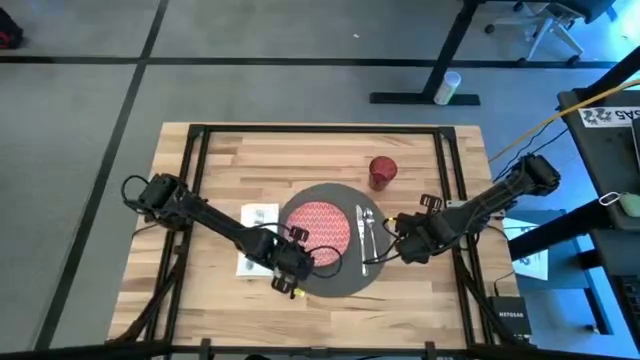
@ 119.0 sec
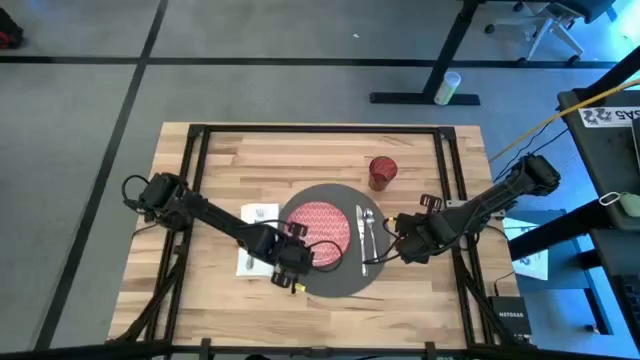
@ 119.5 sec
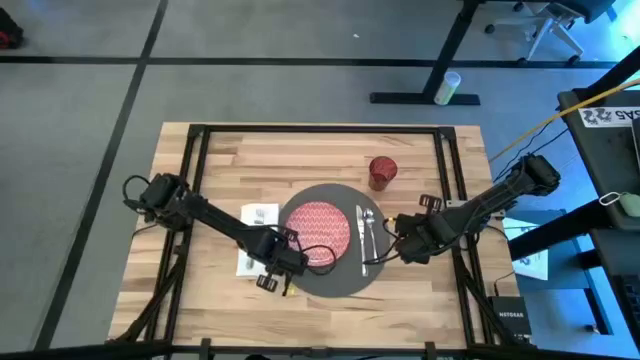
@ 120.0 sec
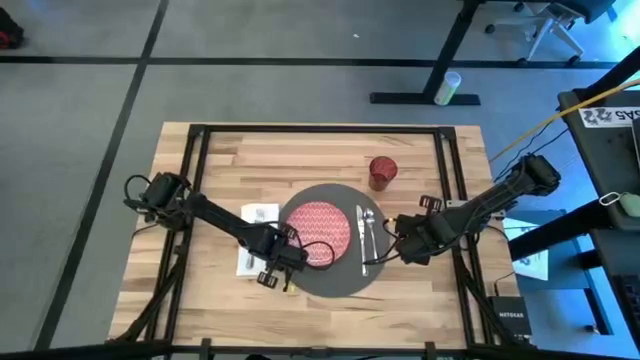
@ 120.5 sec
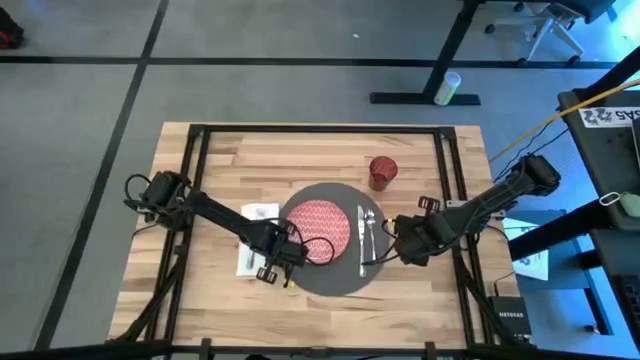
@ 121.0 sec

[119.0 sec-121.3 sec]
Task: Set table place
Adjust the gray placemat

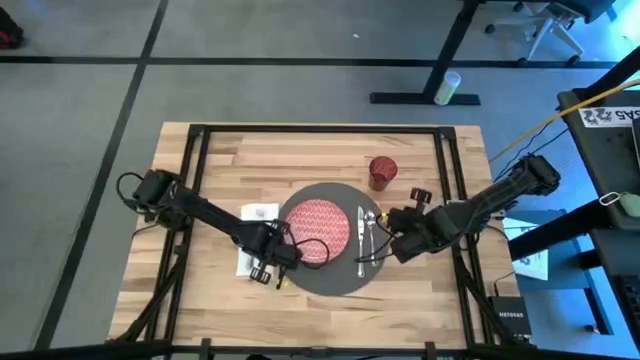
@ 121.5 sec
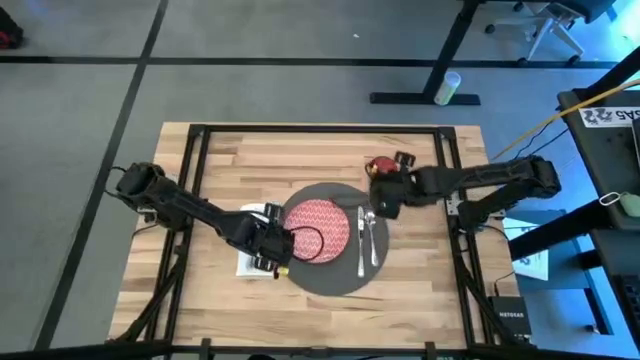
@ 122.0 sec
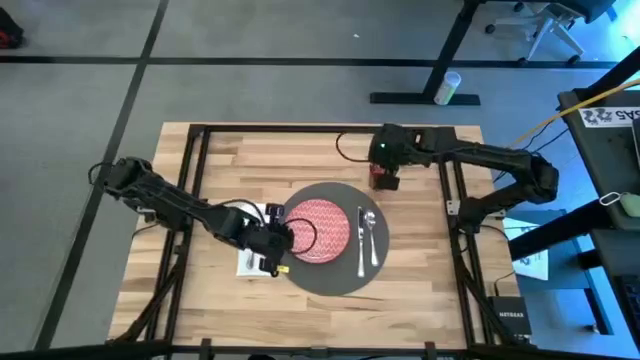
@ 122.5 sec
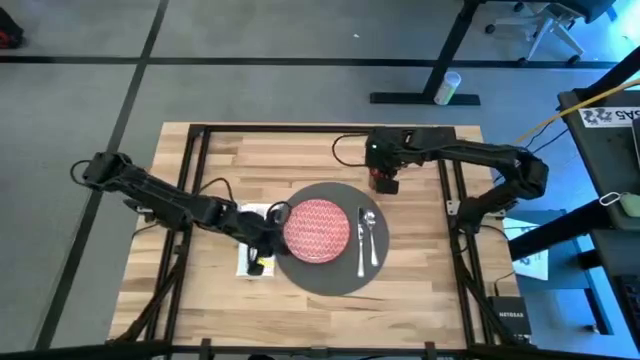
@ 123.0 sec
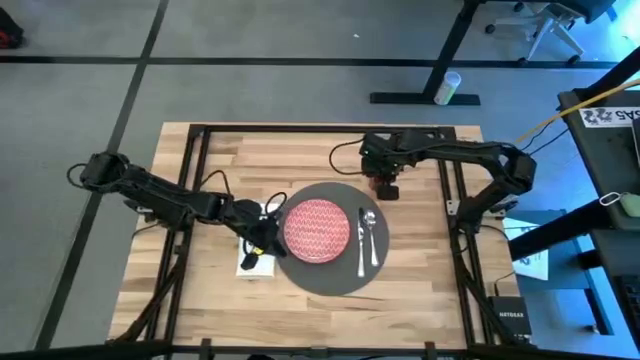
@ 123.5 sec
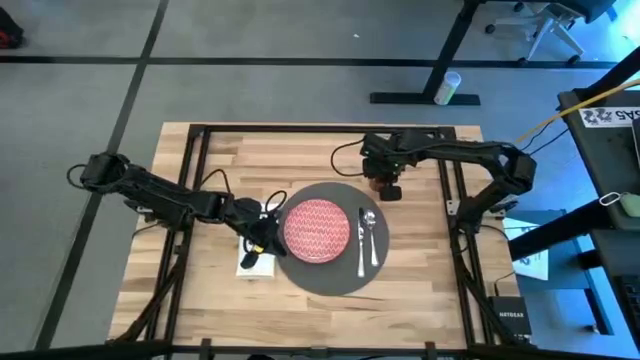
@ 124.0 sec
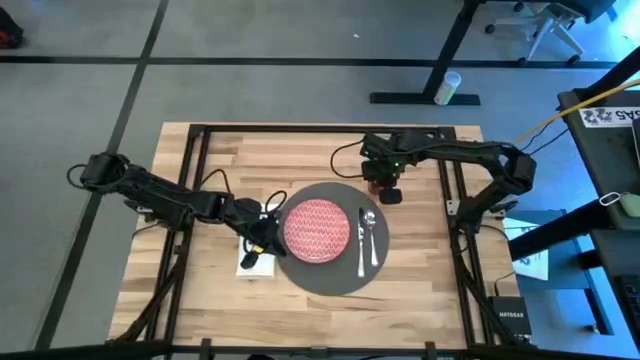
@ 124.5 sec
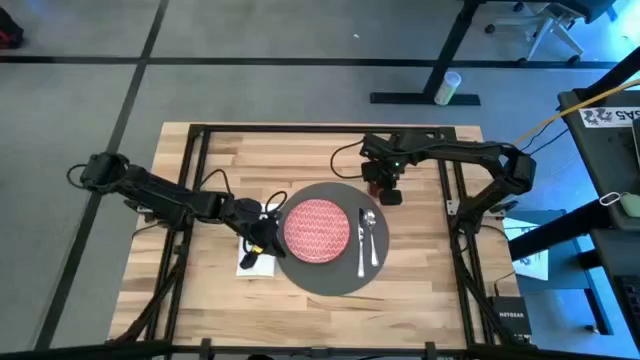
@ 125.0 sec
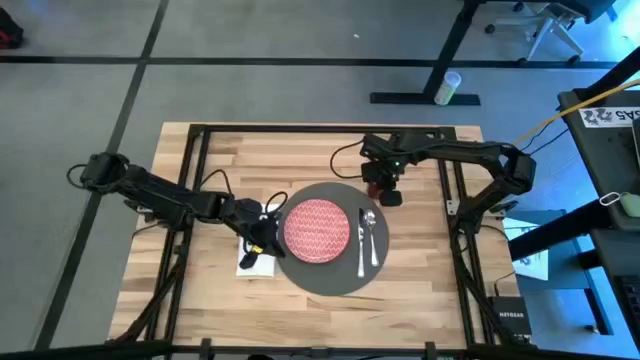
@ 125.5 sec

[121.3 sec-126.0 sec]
Adjust the red glass

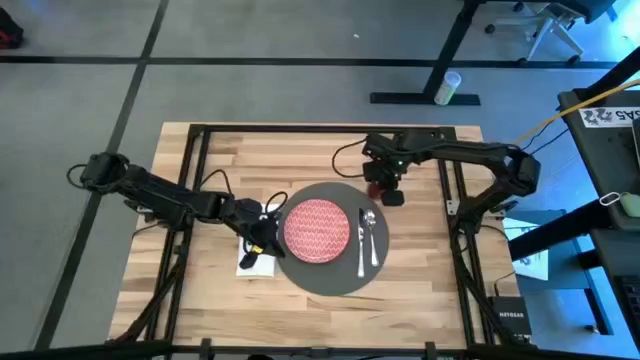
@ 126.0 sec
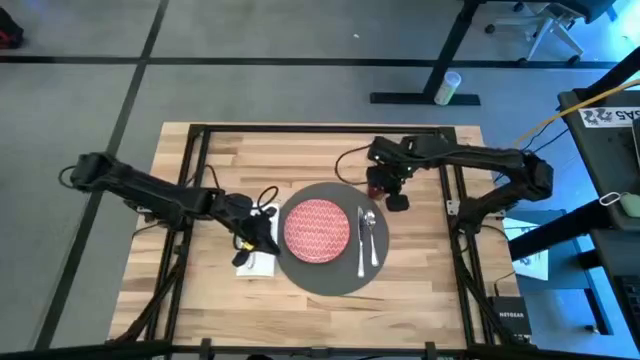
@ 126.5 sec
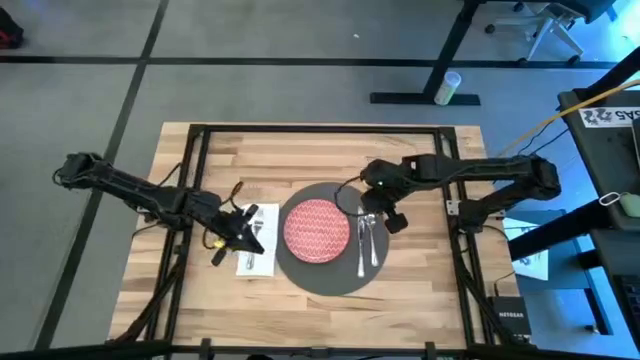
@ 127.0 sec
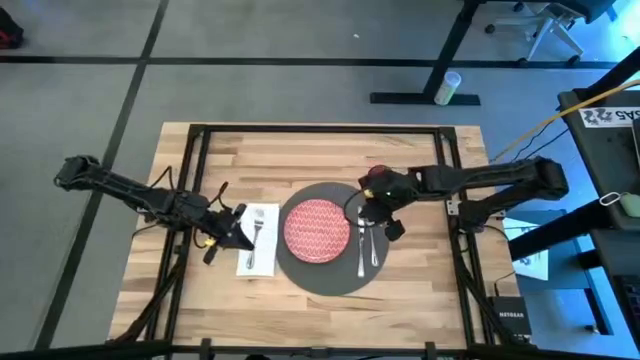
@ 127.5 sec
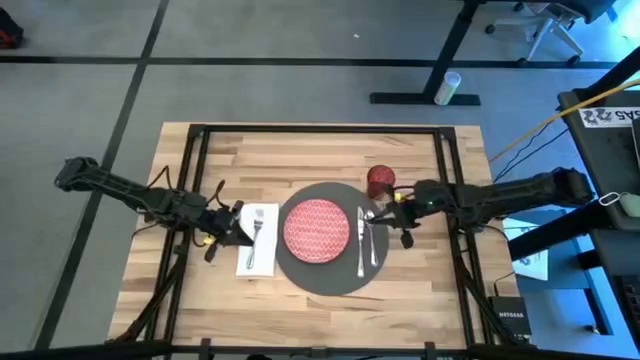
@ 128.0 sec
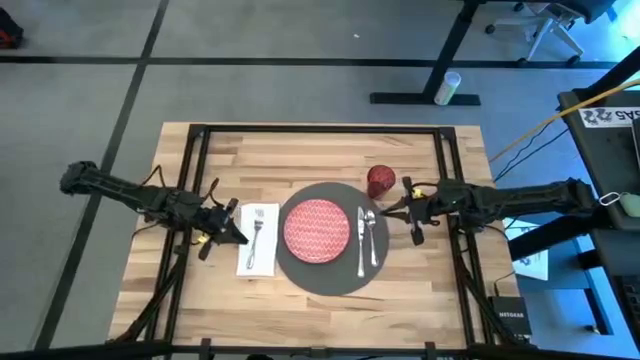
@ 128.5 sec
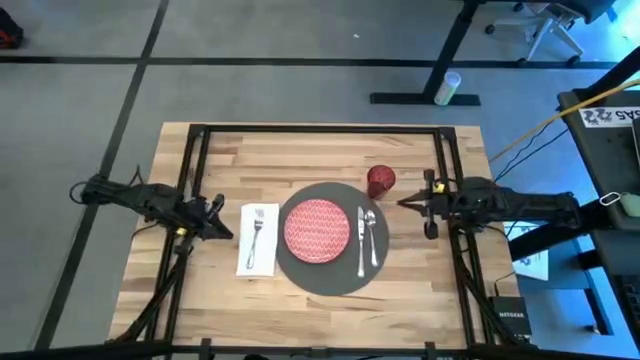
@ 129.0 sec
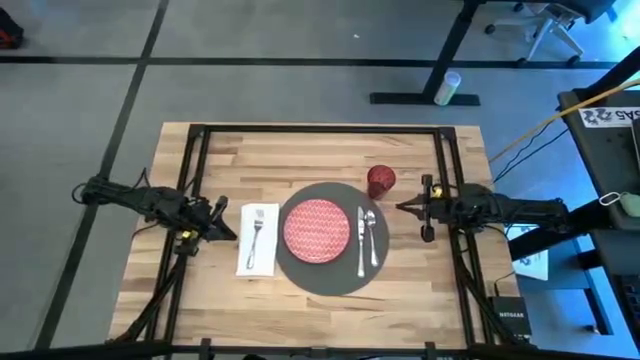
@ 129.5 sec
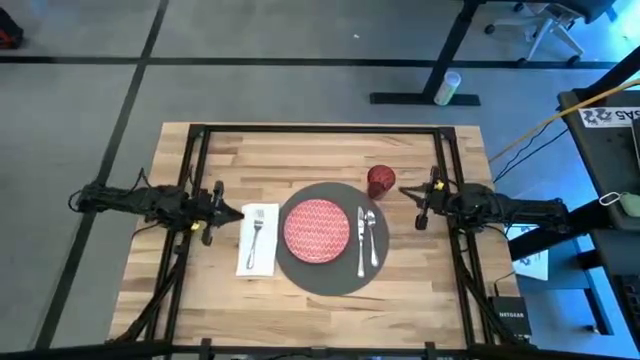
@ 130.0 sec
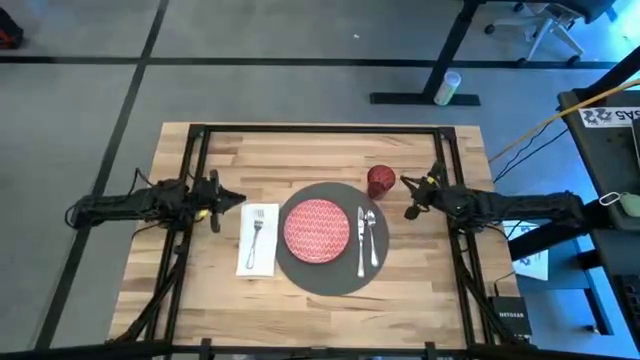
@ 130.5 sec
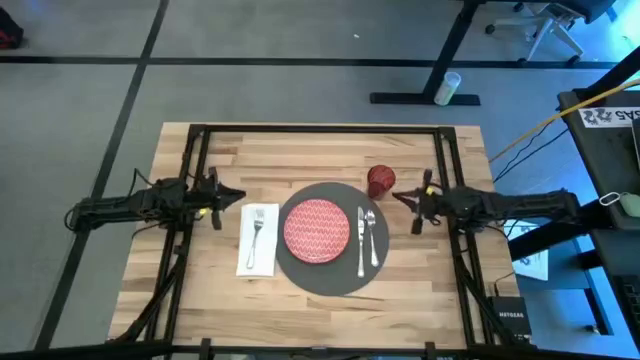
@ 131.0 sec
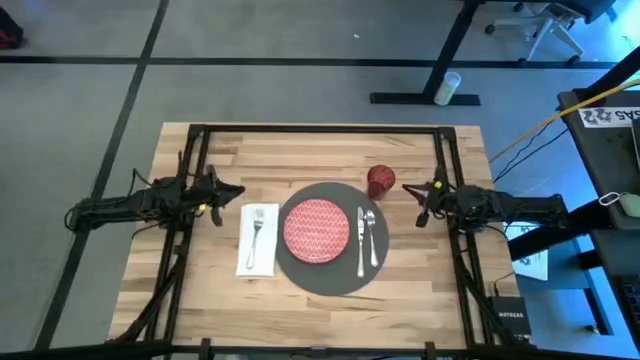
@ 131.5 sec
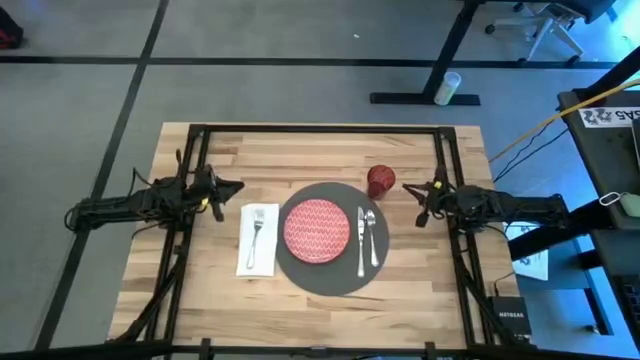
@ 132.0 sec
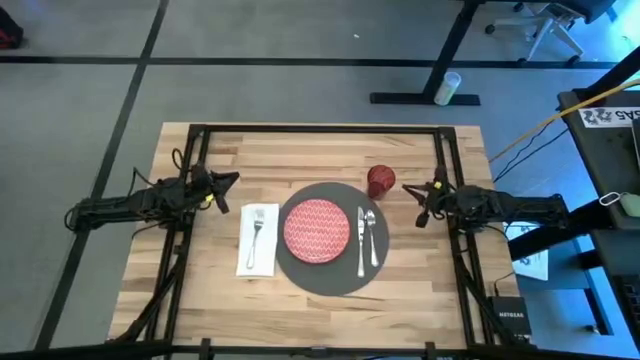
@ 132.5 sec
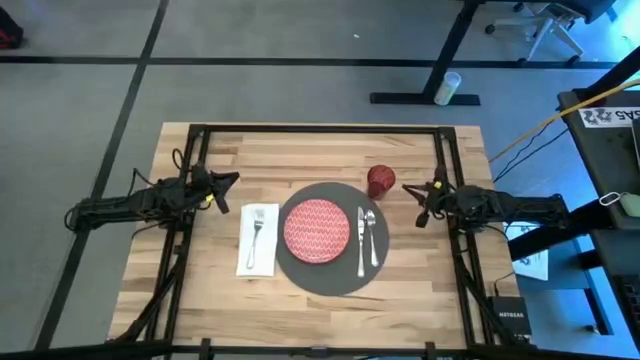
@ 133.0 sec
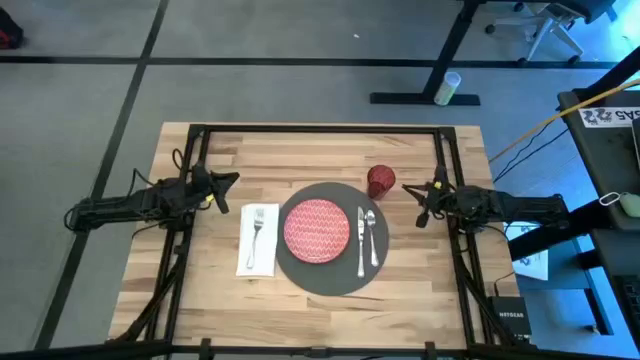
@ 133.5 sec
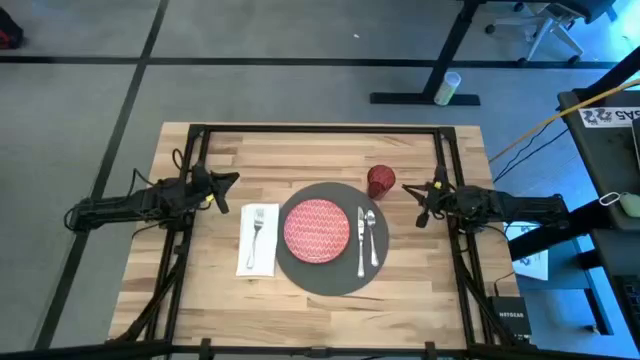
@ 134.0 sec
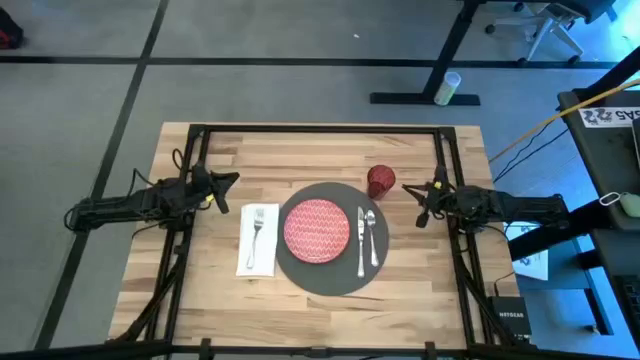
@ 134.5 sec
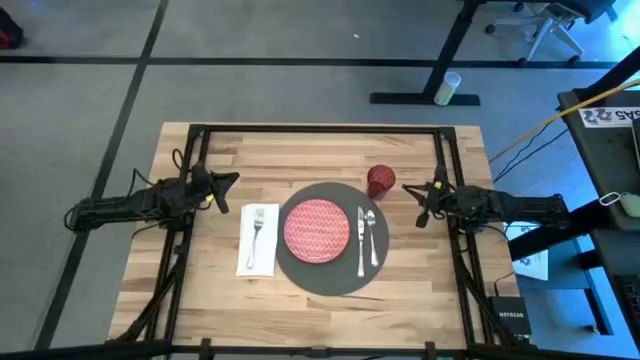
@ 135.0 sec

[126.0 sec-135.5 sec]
Return to Home Position

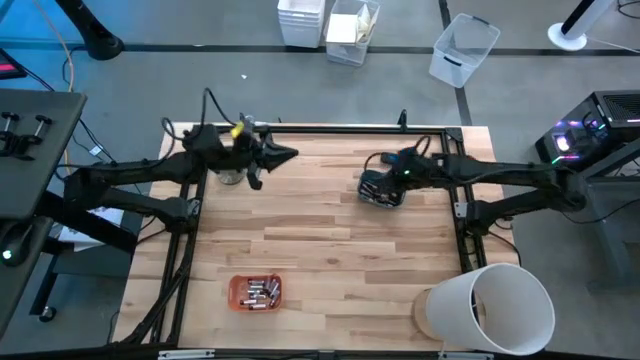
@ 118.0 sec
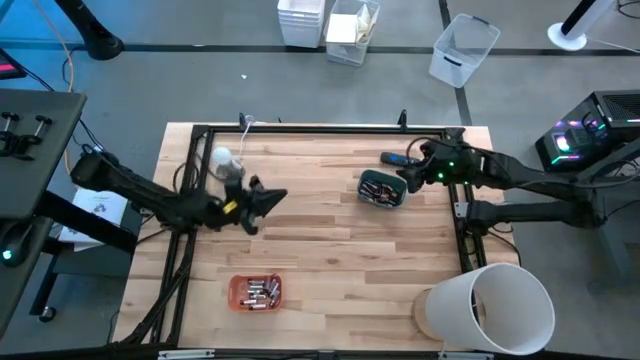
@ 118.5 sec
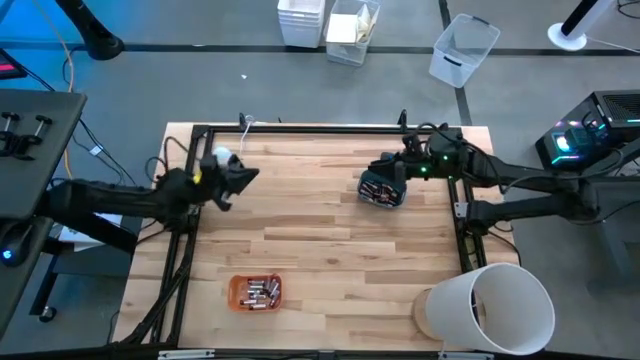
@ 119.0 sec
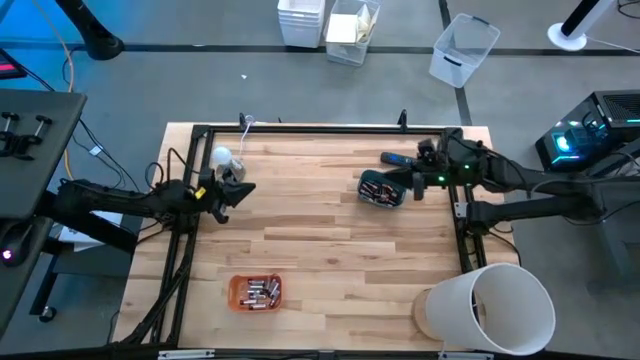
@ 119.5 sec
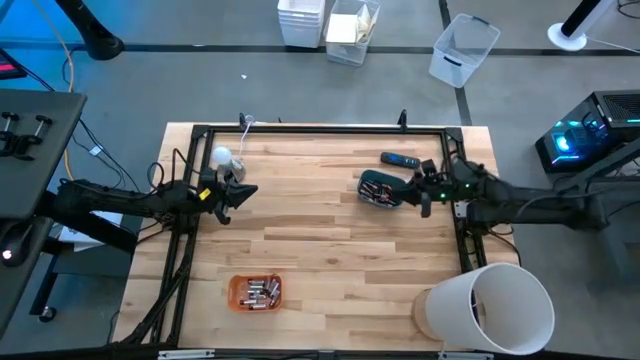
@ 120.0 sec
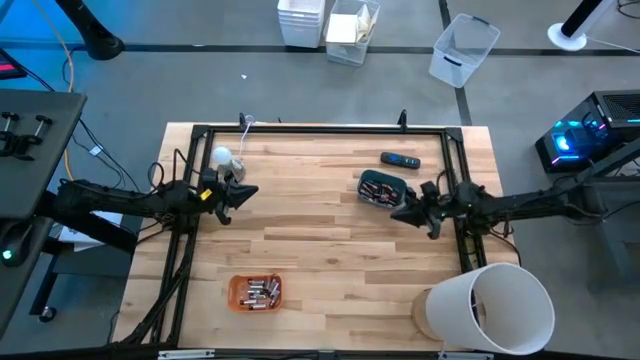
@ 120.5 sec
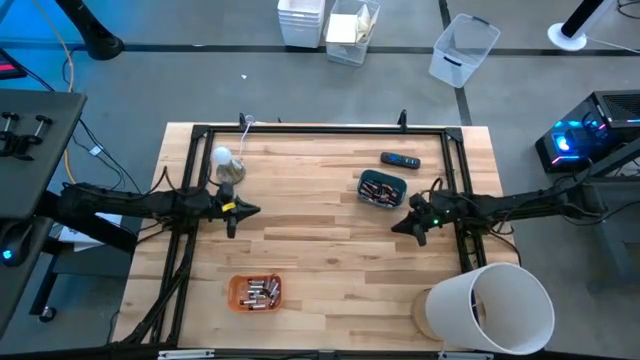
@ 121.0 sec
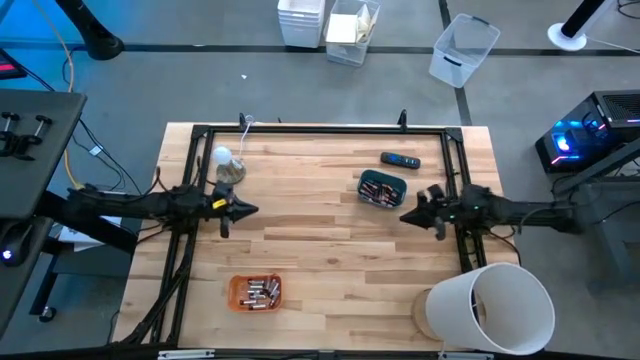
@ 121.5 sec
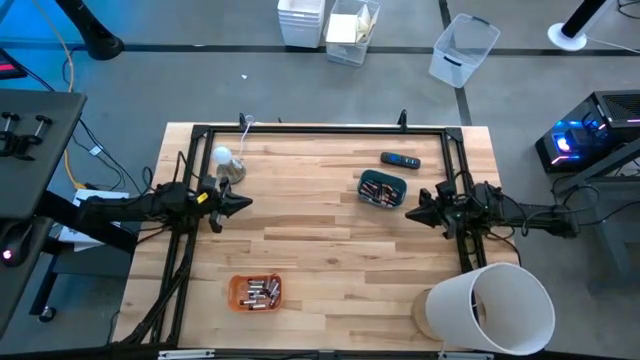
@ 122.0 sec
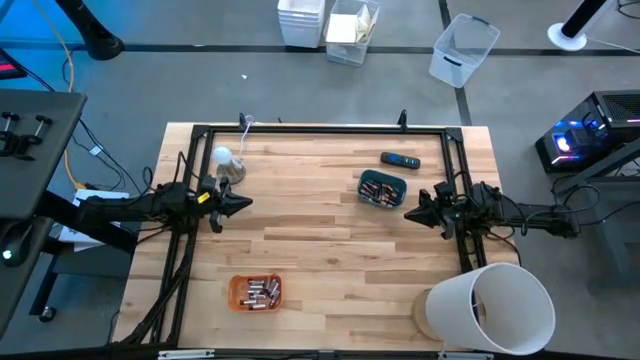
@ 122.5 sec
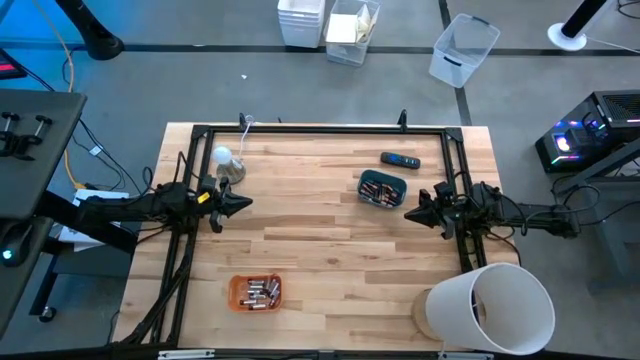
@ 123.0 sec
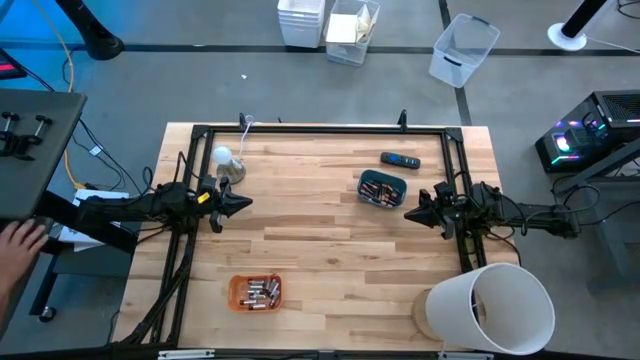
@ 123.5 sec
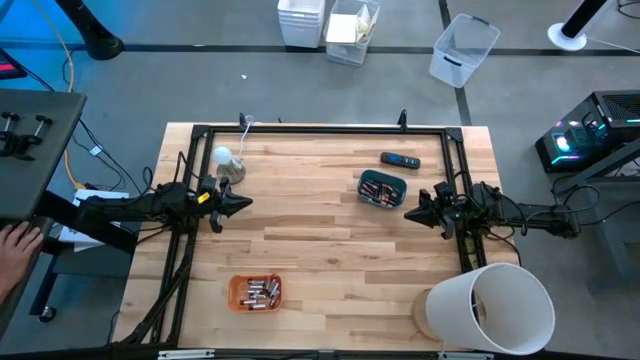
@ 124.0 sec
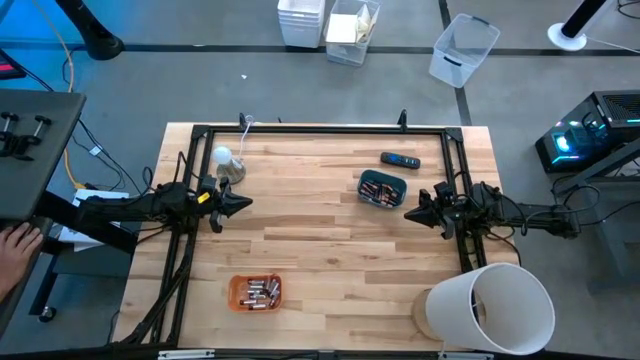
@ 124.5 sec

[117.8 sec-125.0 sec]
Task: Sort batteries
Return to Home Position
